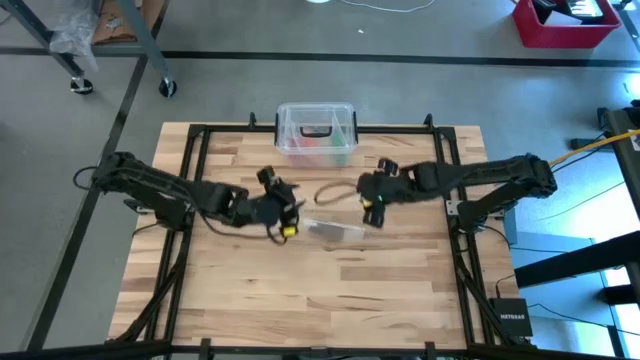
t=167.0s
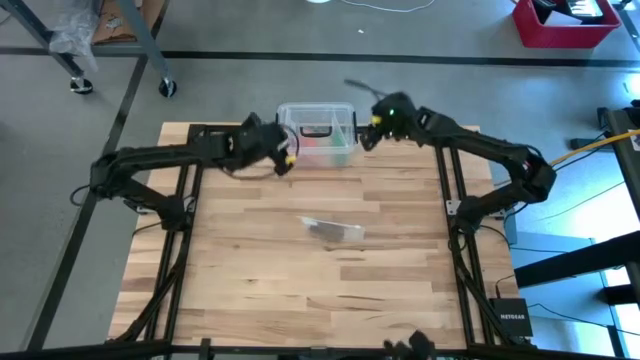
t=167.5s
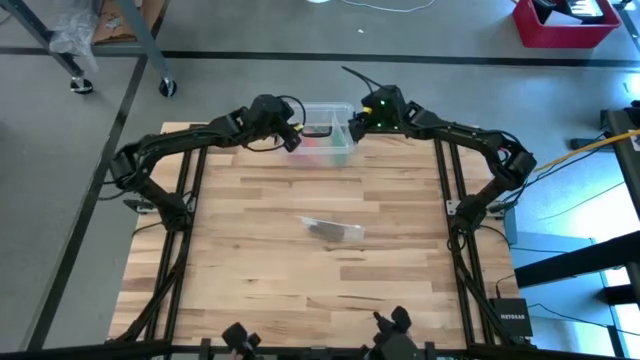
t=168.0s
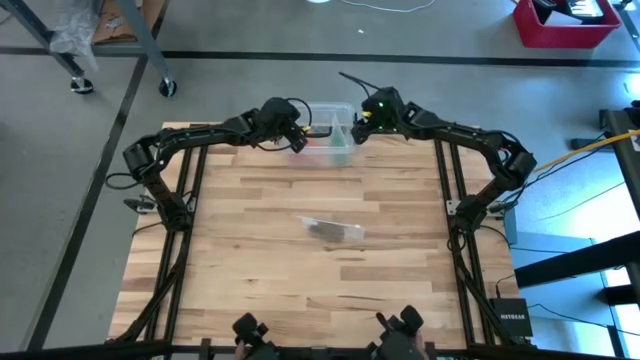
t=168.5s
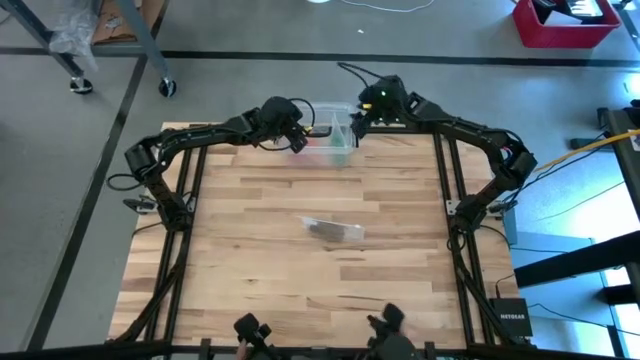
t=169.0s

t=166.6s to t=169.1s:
Task: Roll bandage
Open the transparent bin

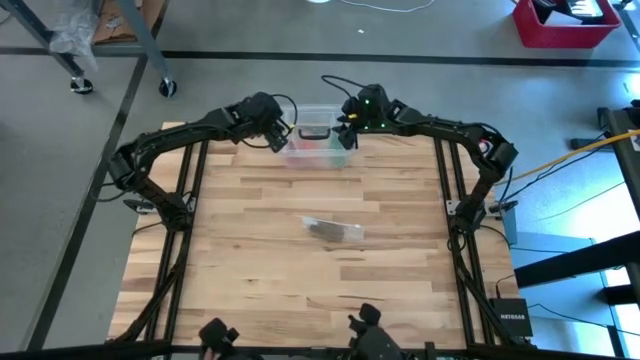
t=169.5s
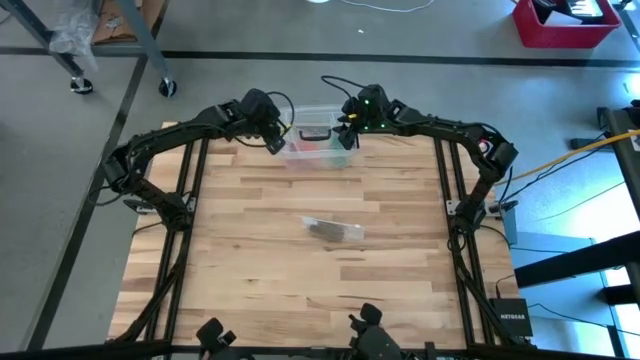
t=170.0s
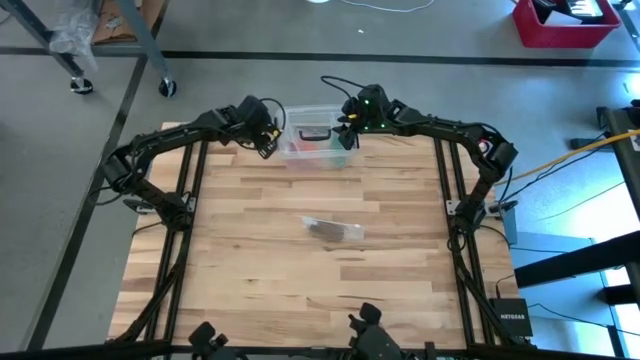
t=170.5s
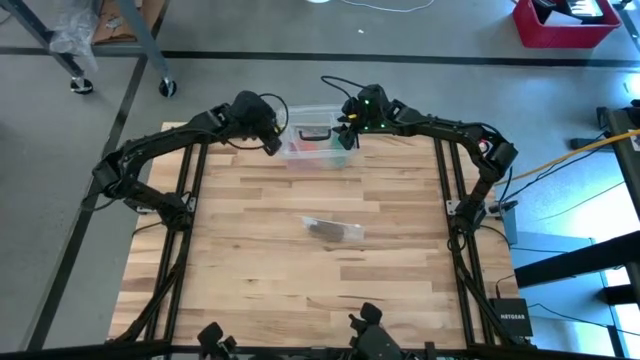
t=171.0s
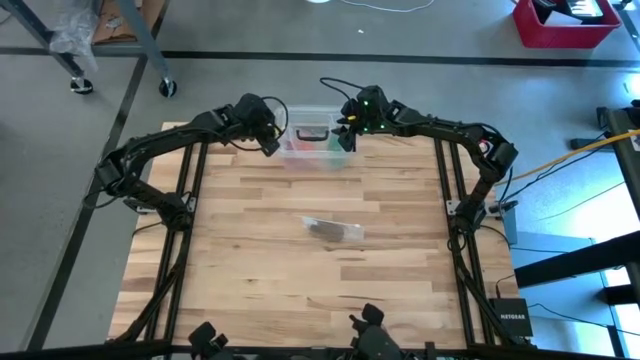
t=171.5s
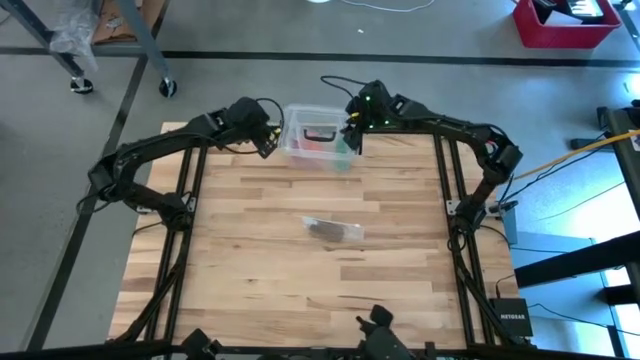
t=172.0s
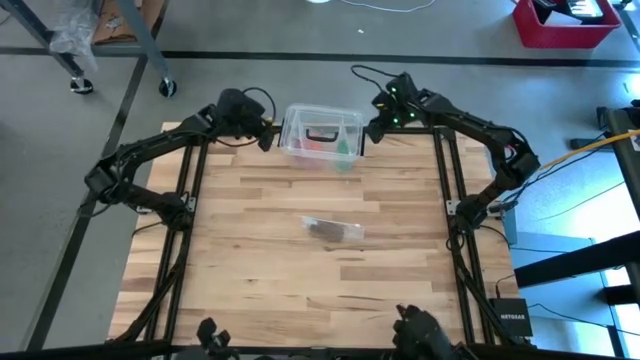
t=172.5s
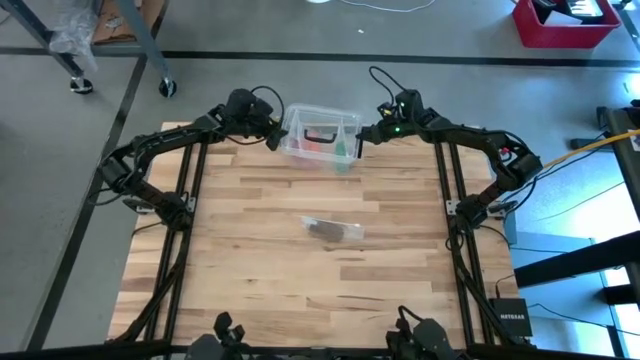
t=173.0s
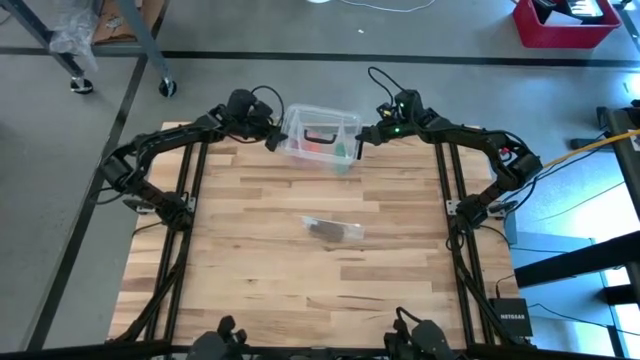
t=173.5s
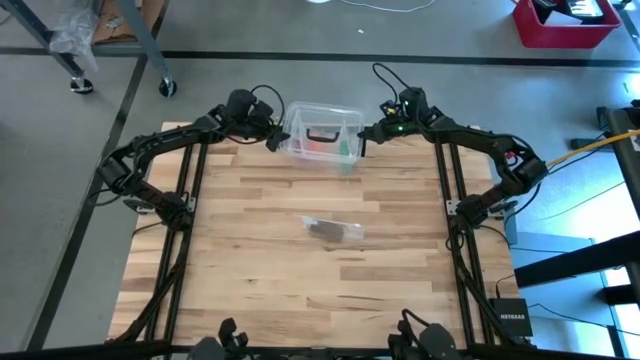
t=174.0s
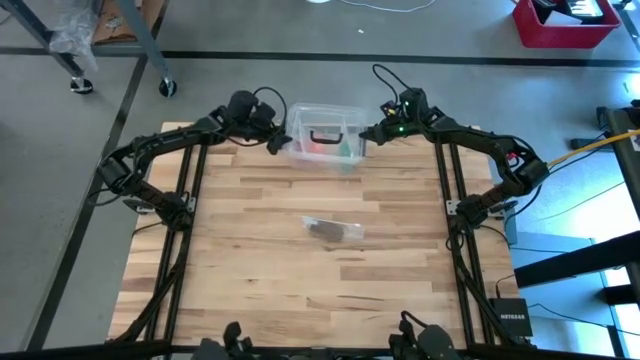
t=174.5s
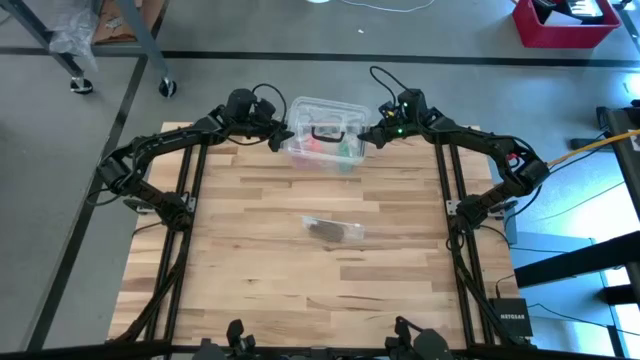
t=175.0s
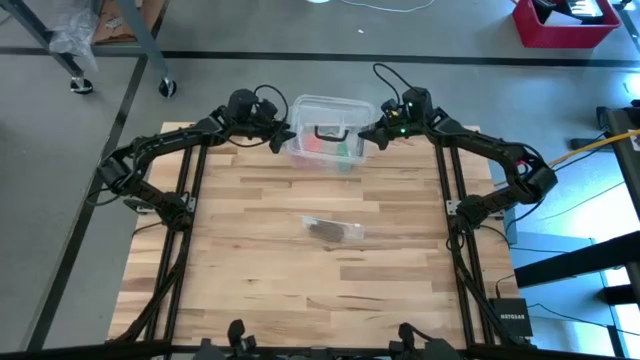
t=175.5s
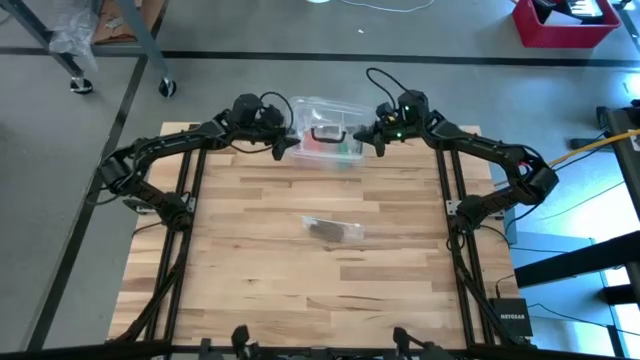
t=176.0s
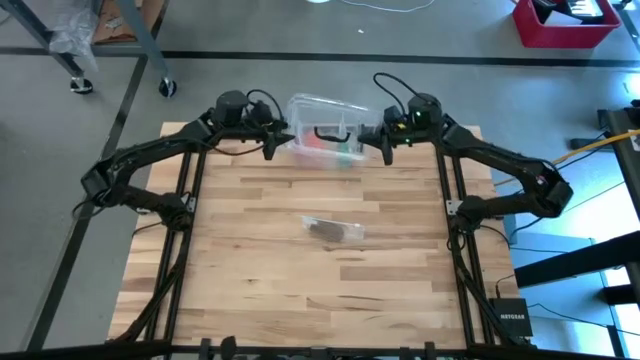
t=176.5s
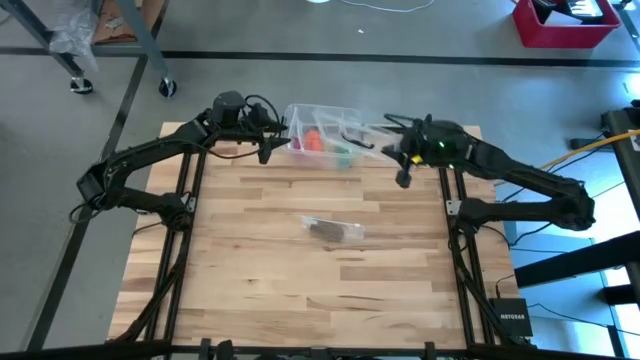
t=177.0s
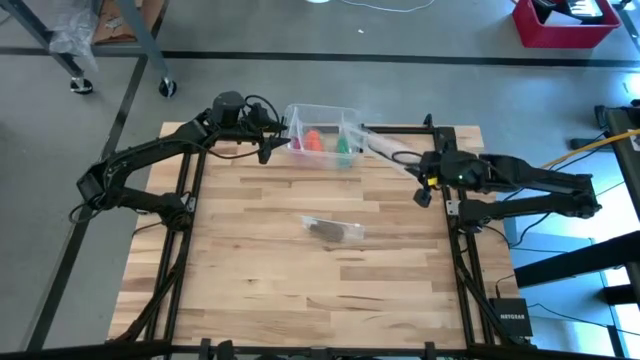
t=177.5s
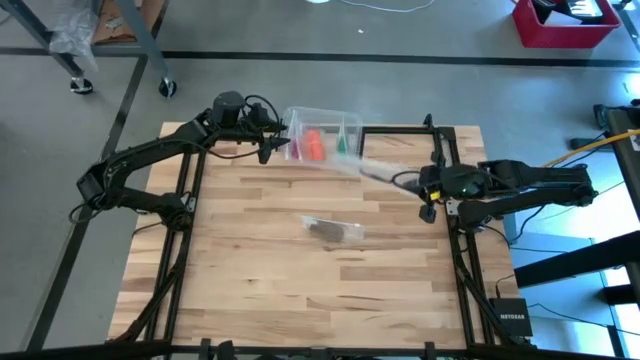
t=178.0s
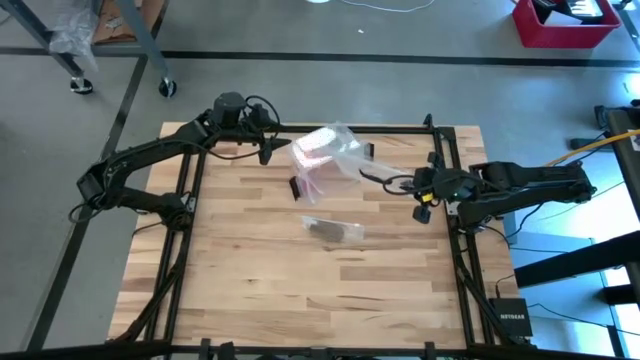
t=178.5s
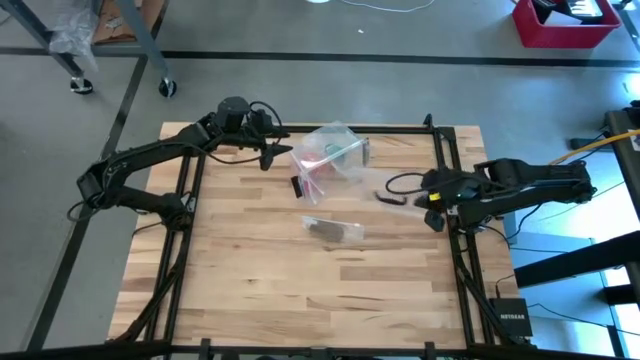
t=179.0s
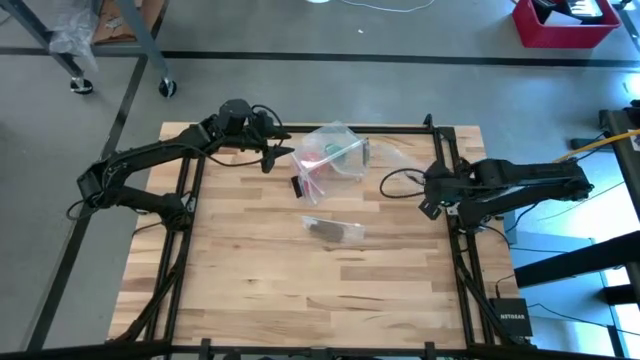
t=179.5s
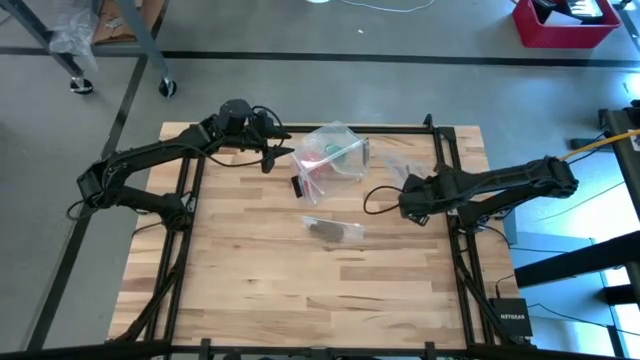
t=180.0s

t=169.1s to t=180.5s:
Open the transparent bin

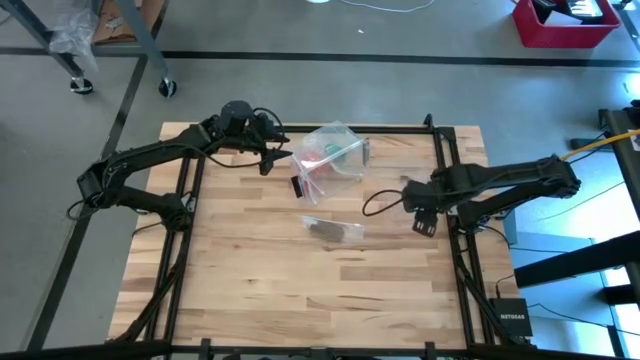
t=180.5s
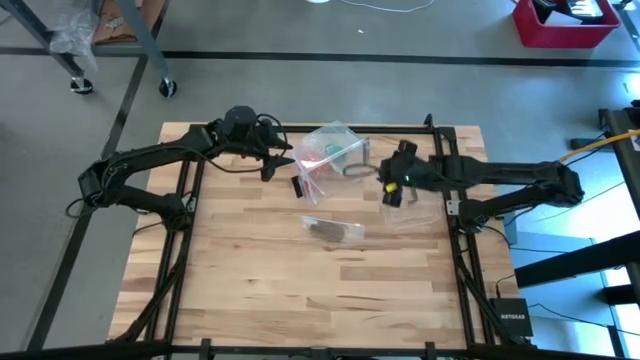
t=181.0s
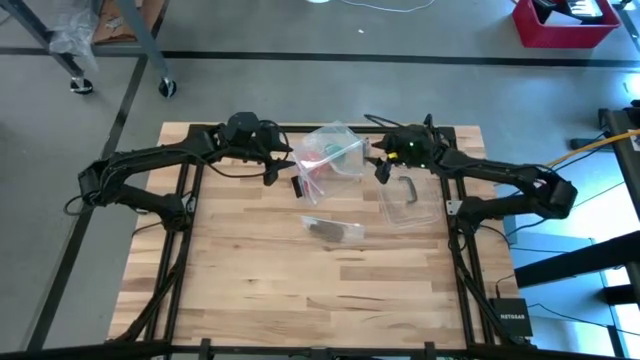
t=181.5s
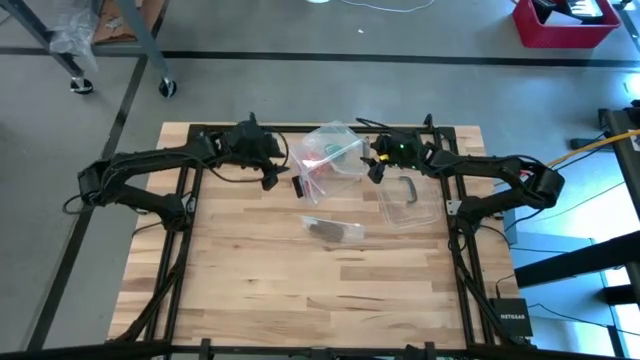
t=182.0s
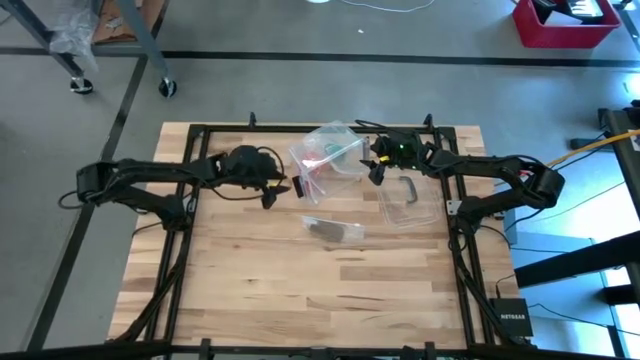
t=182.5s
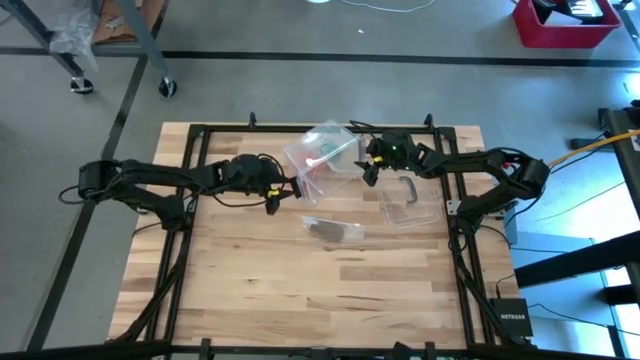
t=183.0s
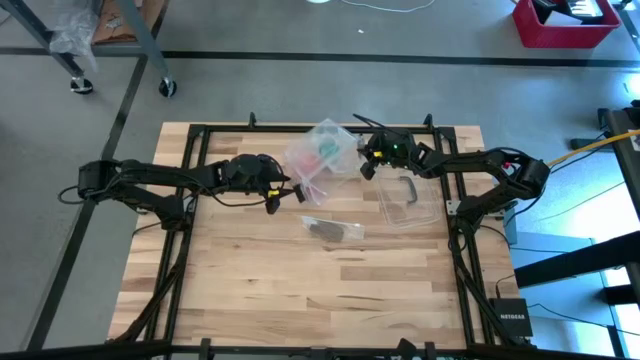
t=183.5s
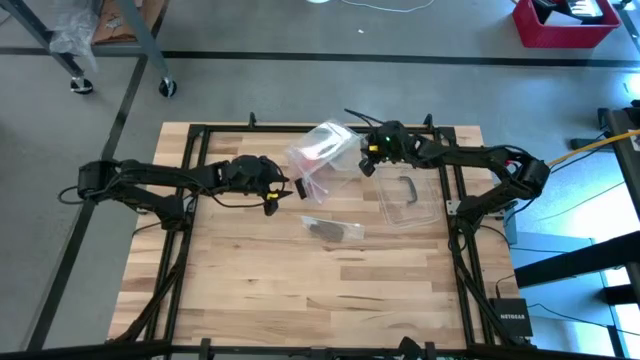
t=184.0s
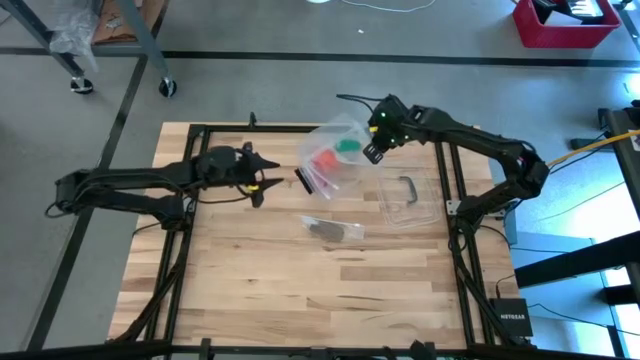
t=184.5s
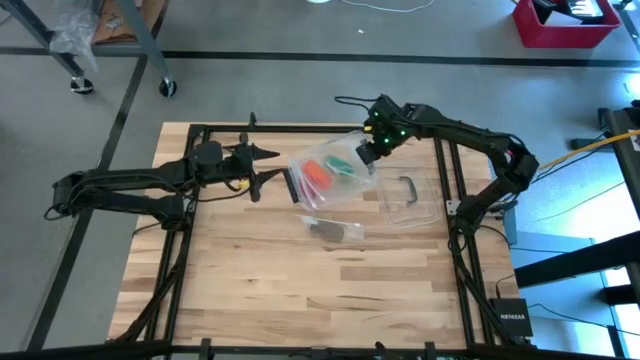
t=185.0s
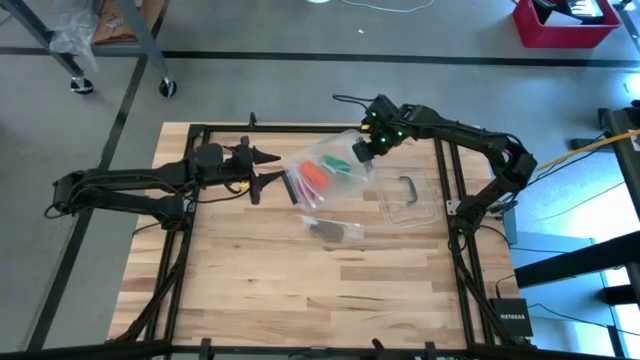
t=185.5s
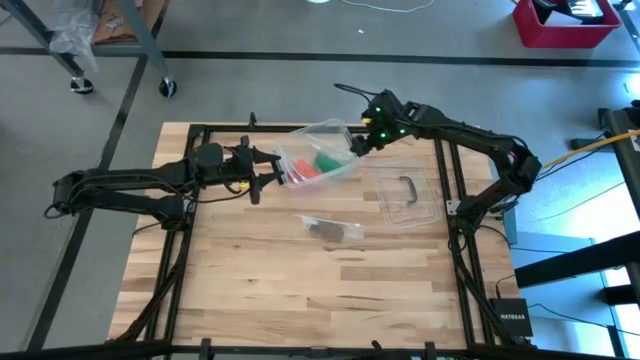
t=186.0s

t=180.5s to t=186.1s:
Adjust the transparent bin

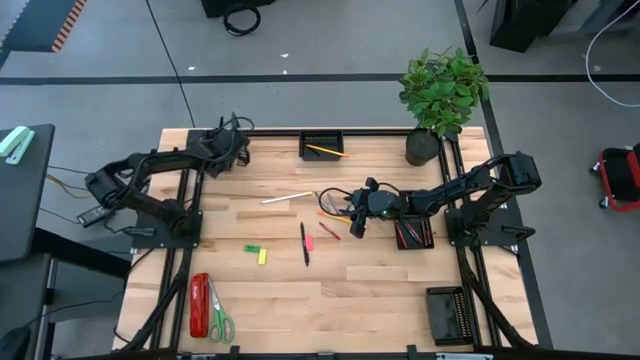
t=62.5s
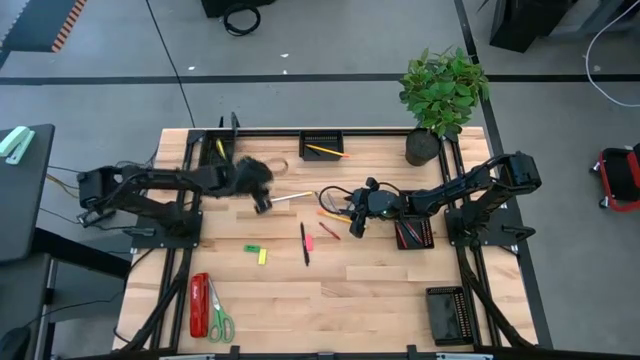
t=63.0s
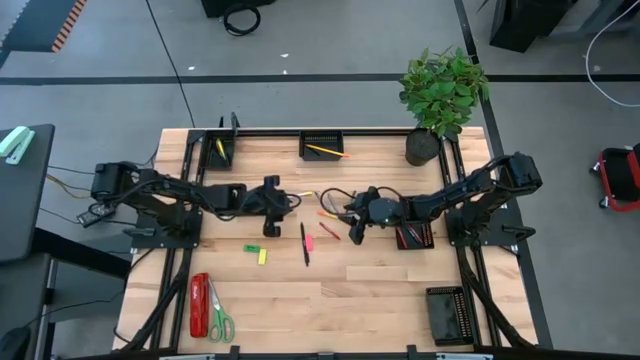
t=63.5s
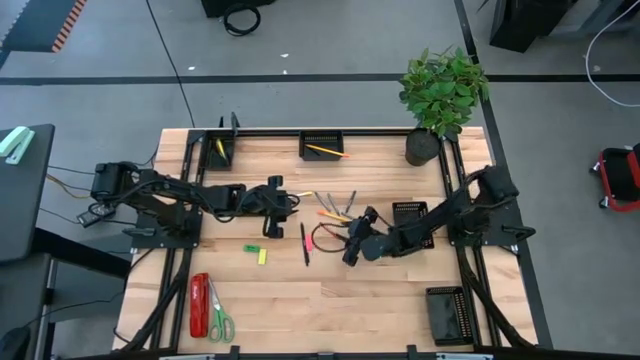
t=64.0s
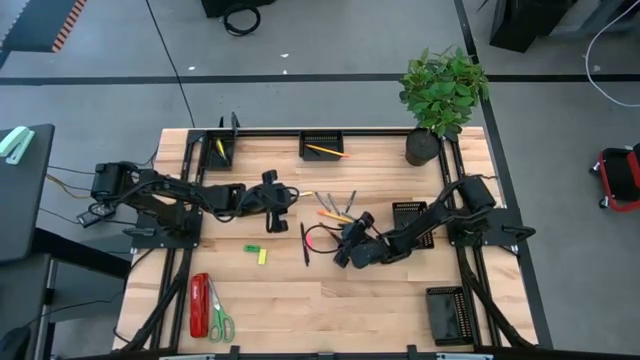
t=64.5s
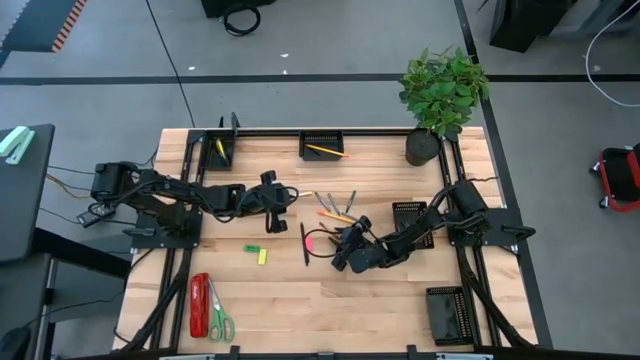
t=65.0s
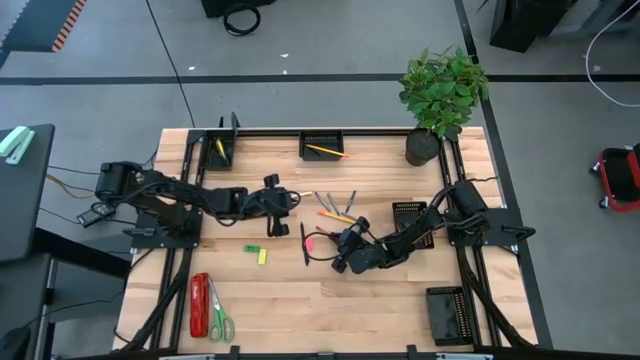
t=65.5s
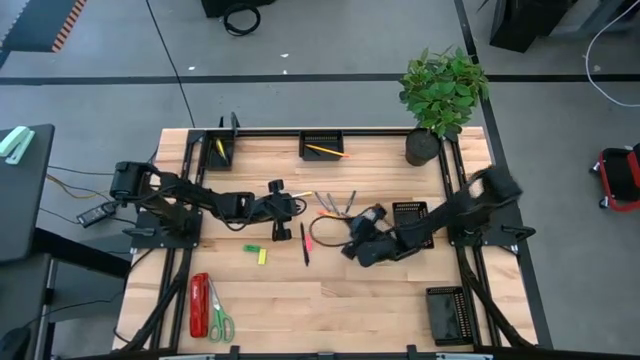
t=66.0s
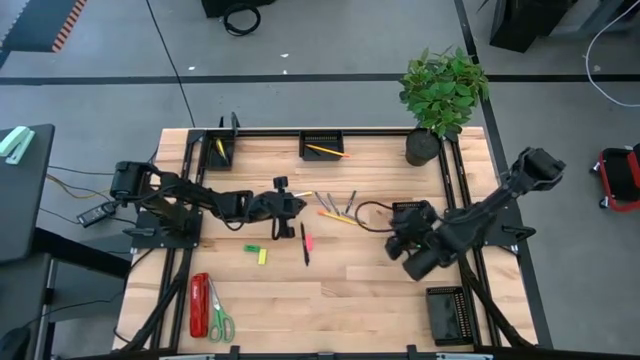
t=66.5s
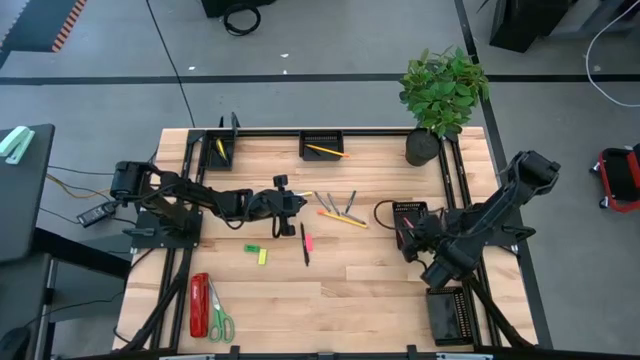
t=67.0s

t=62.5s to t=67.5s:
Task: Sort crayons/erasers/pens/pencils in bins
Put the red crayon into the middle right black bin
